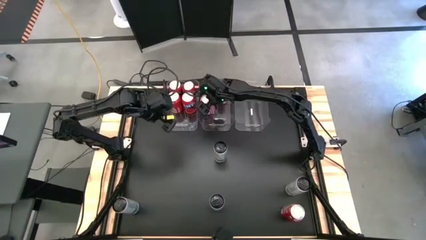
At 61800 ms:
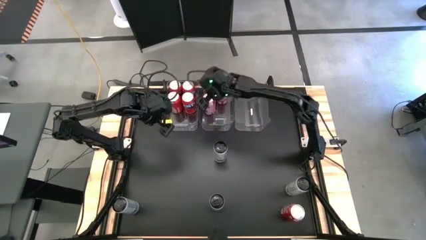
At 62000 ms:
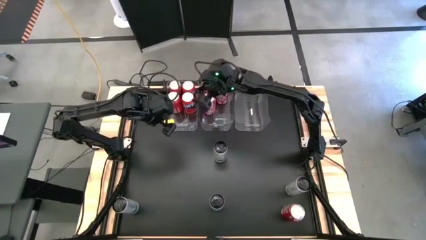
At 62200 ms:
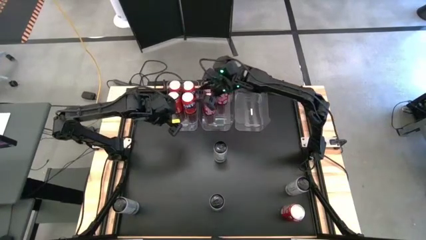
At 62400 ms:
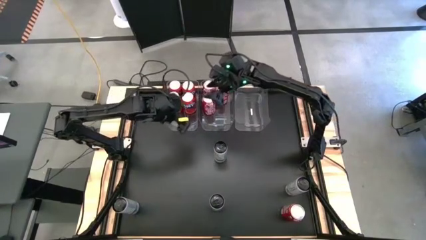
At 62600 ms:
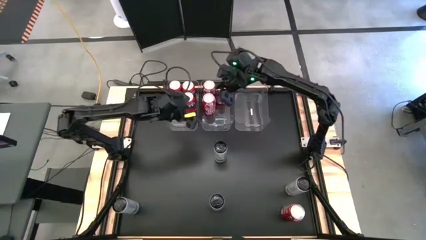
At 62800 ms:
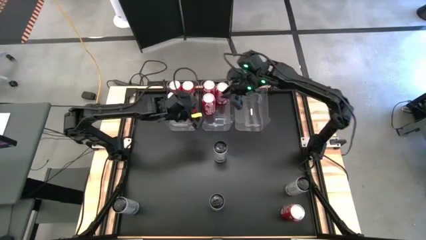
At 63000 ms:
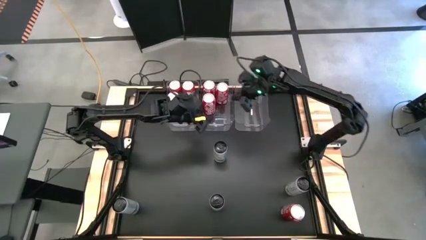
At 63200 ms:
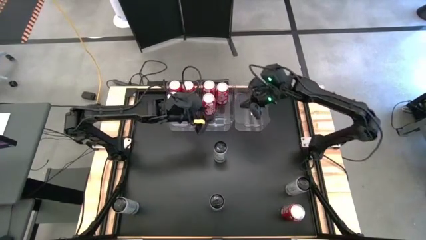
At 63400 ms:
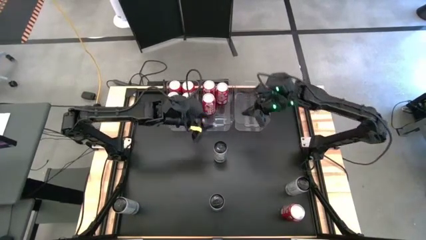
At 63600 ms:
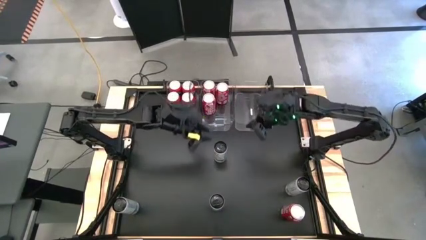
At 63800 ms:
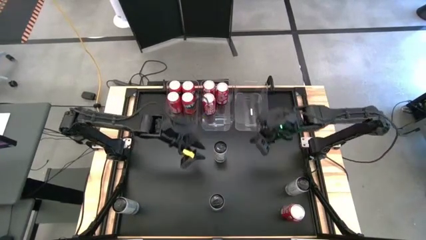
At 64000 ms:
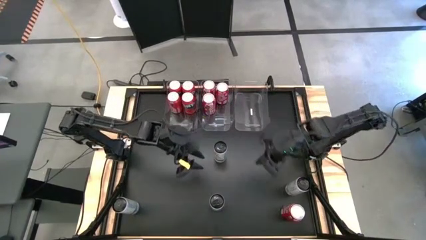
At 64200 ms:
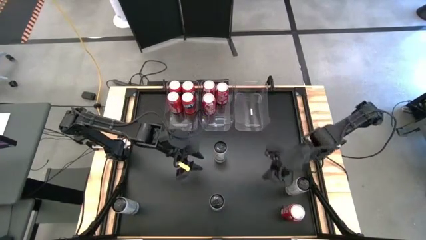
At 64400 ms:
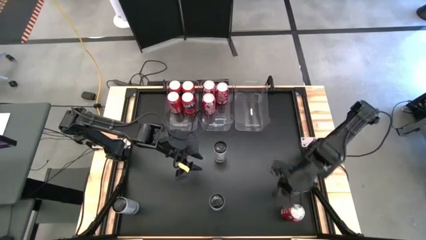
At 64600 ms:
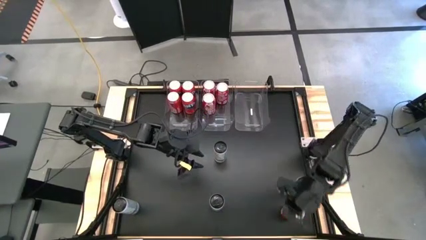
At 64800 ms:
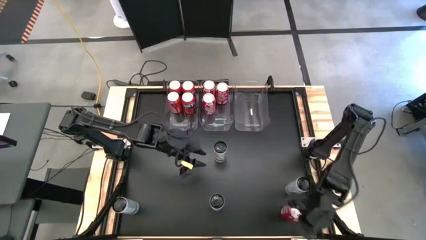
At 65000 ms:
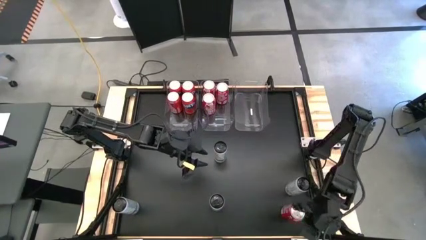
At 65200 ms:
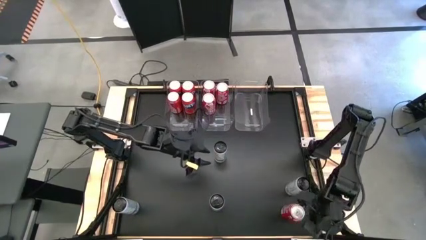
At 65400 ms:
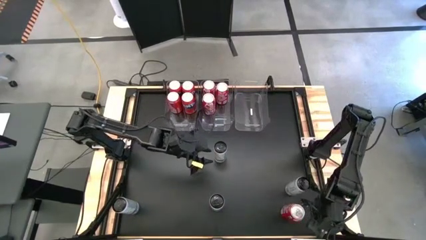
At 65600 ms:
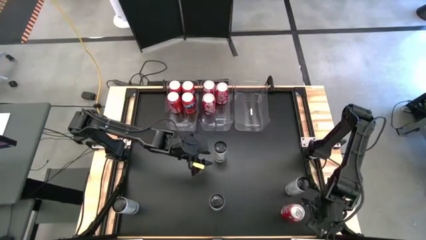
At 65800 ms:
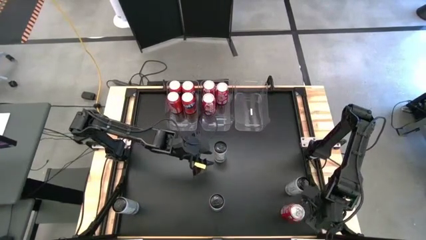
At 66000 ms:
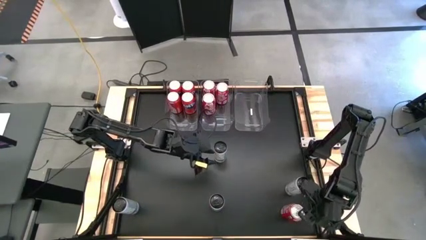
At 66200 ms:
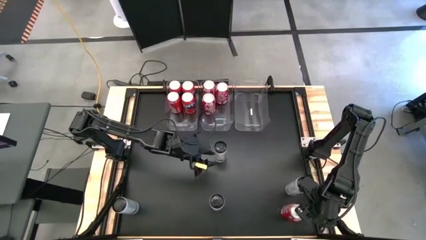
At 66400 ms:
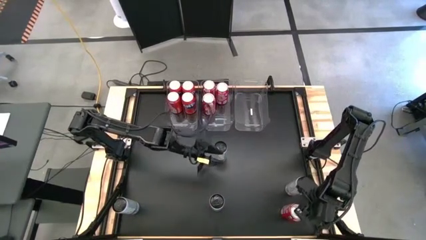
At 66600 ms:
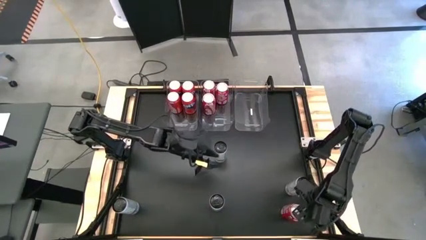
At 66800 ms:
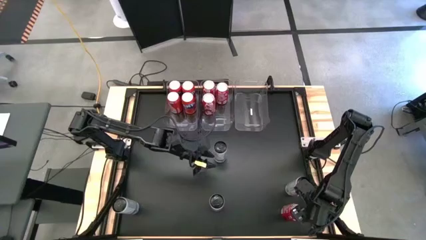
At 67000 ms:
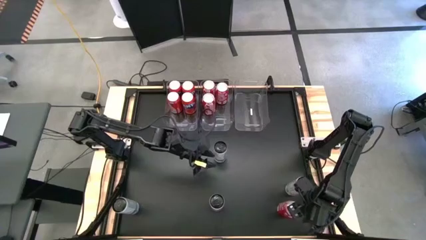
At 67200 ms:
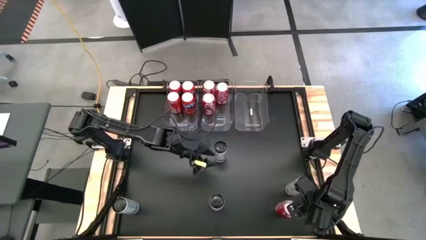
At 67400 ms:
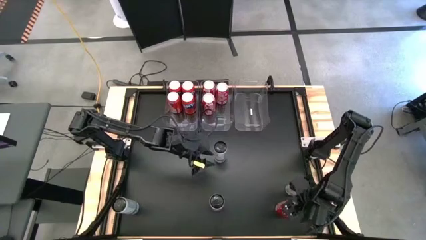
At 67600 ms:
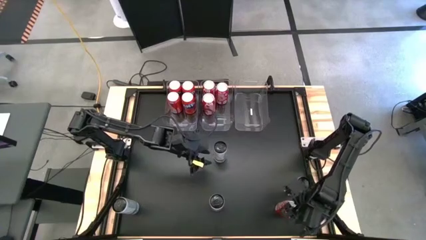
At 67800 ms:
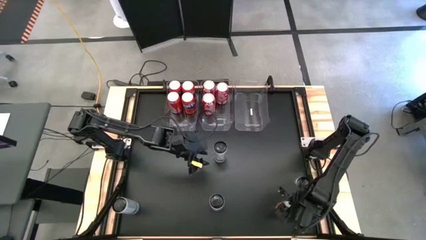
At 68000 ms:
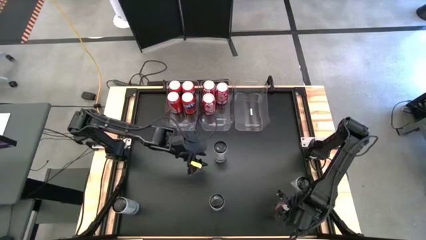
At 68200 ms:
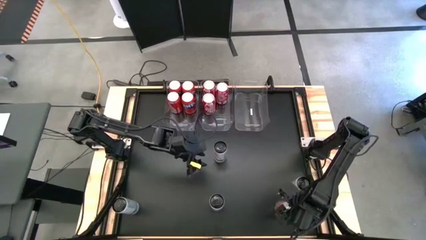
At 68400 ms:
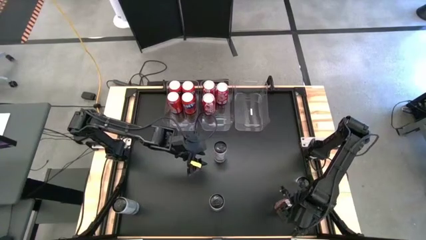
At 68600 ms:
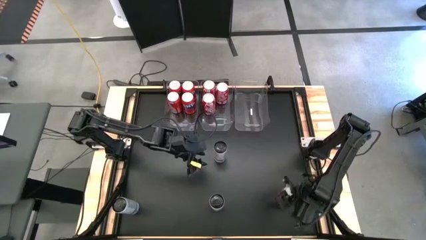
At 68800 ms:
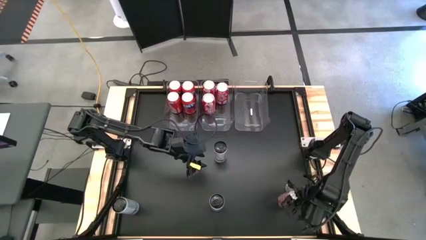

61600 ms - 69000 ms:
Task: Sort soda cans
Put the red and white soda can into the middle transparent bin

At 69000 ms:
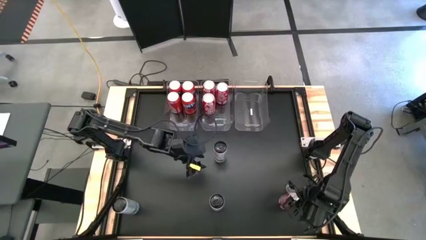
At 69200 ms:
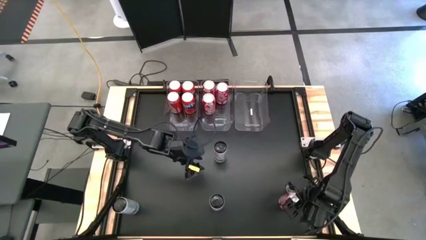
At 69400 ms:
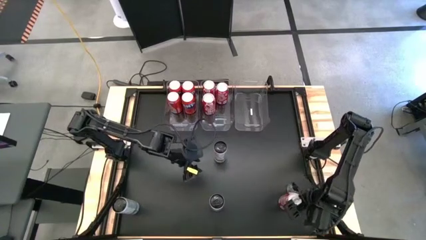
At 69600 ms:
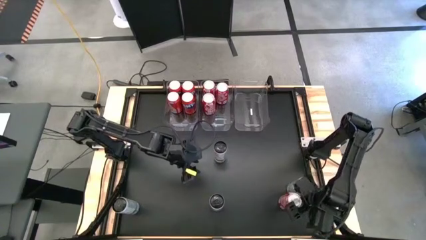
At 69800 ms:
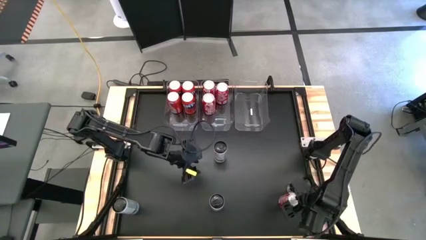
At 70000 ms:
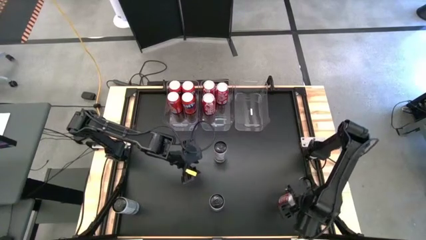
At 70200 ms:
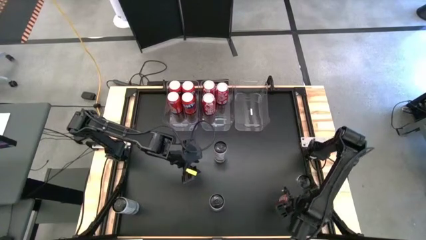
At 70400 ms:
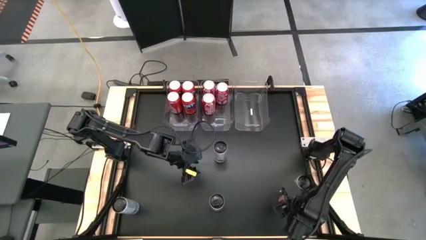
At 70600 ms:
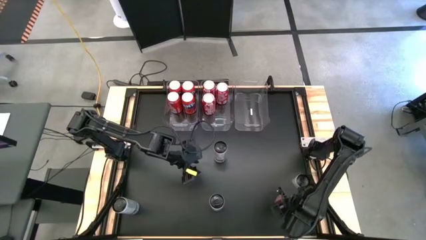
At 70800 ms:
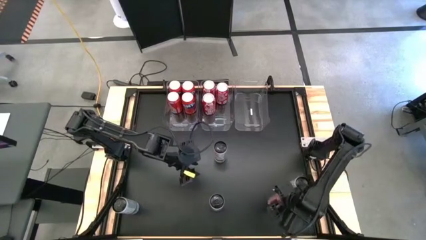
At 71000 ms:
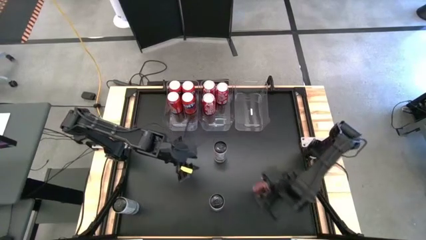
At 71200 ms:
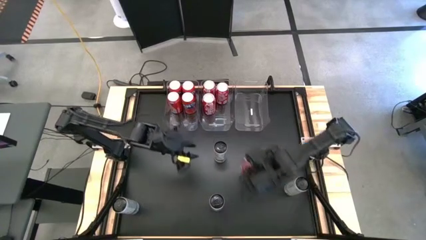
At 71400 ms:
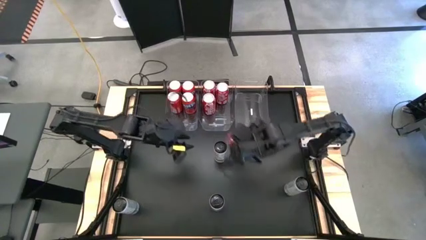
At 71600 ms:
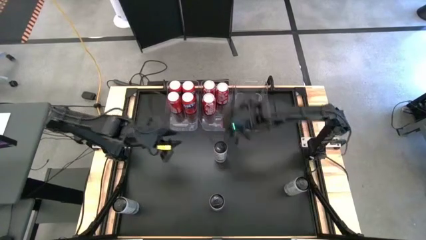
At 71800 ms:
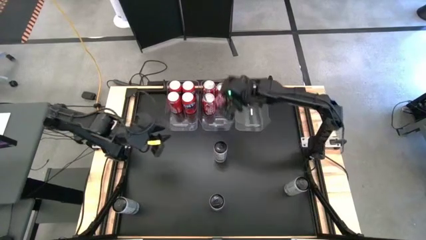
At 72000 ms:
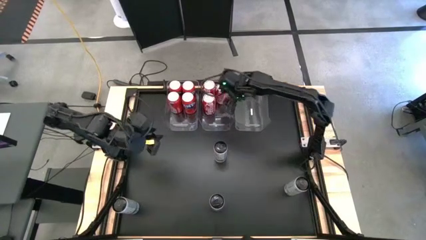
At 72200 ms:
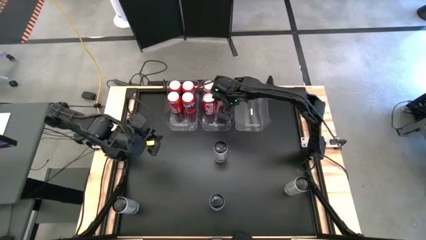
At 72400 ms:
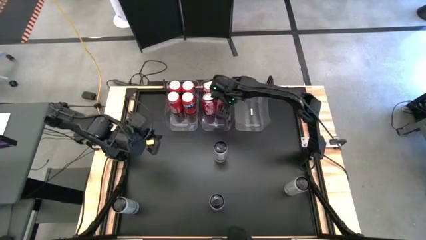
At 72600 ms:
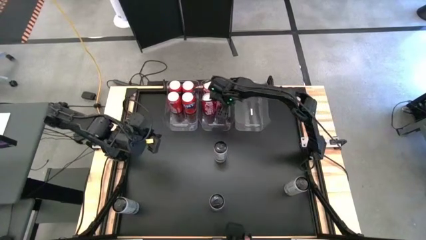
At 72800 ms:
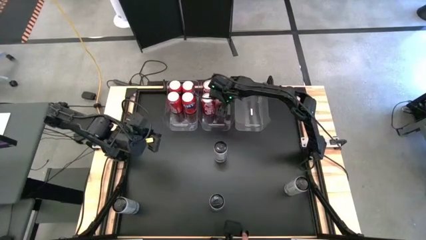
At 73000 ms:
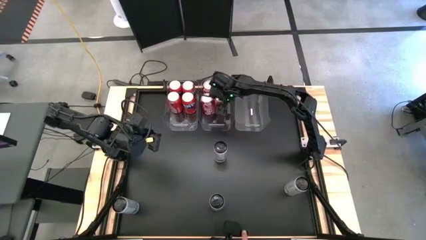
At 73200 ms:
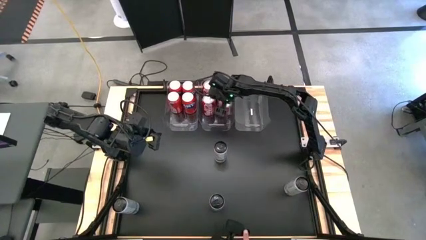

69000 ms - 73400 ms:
Put the red and white soda can into the middle transparent bin

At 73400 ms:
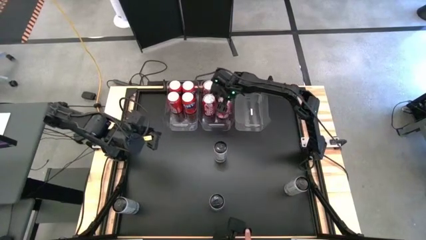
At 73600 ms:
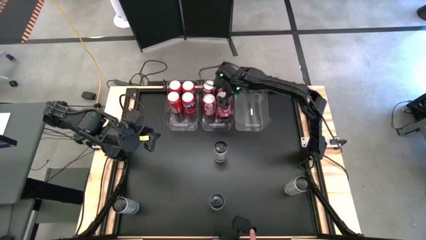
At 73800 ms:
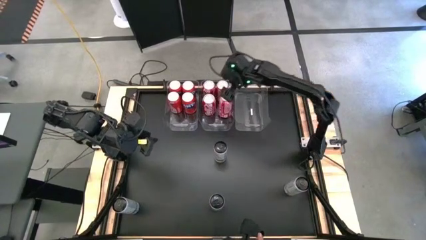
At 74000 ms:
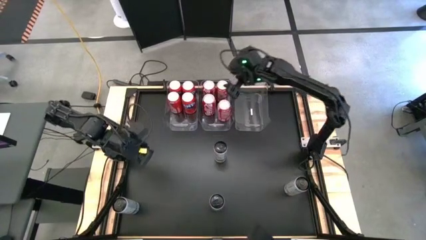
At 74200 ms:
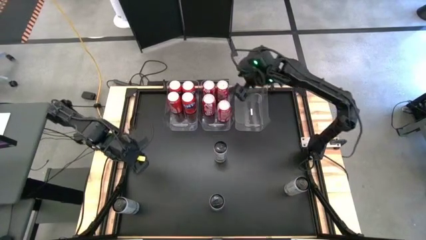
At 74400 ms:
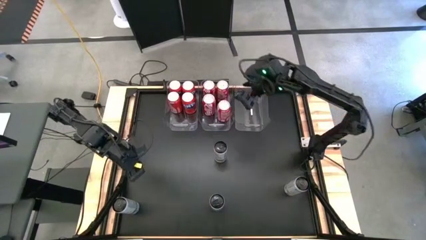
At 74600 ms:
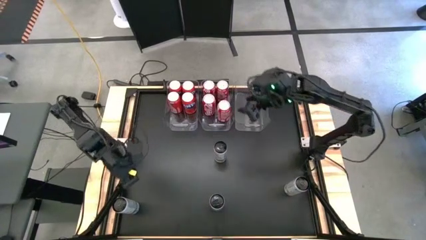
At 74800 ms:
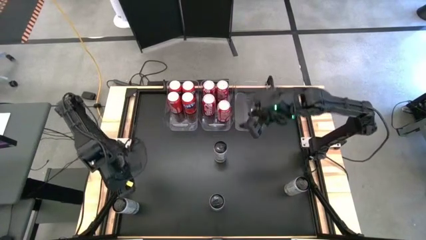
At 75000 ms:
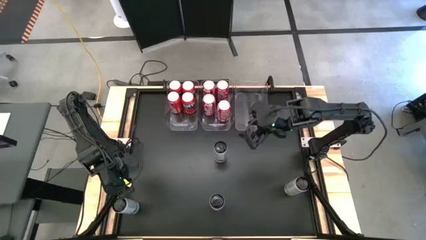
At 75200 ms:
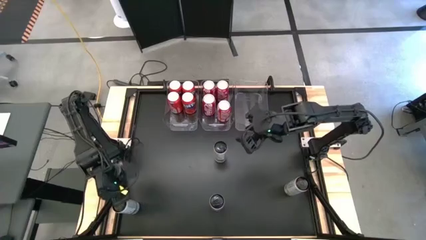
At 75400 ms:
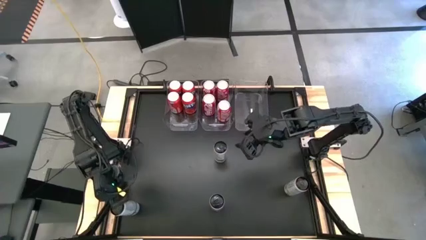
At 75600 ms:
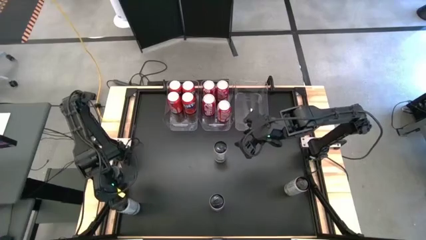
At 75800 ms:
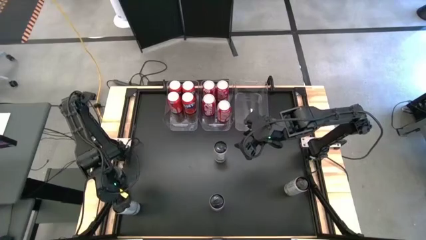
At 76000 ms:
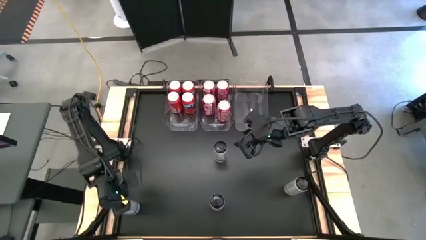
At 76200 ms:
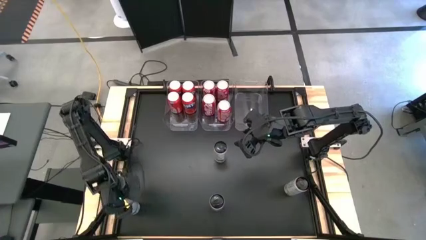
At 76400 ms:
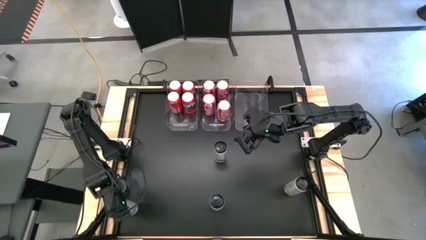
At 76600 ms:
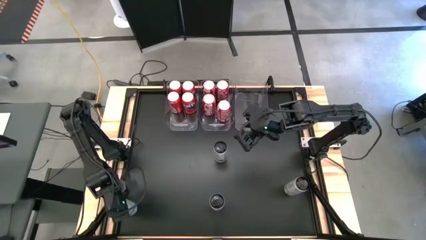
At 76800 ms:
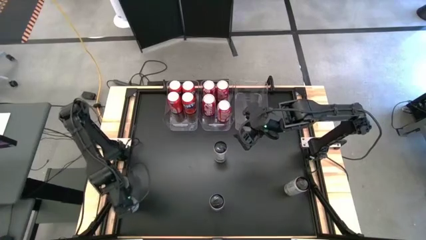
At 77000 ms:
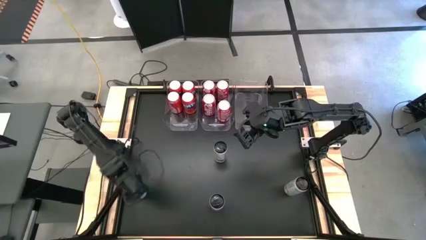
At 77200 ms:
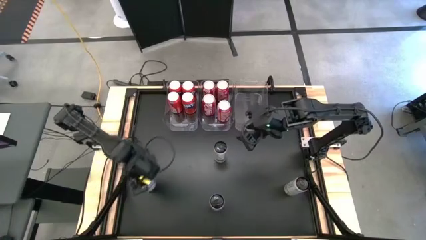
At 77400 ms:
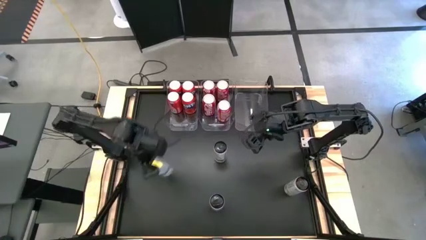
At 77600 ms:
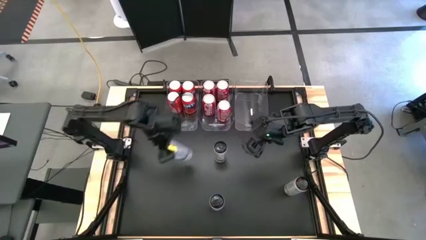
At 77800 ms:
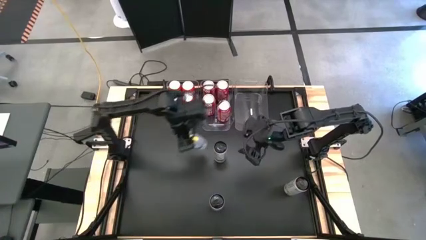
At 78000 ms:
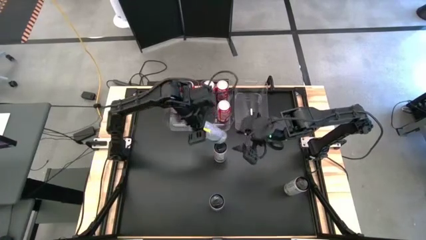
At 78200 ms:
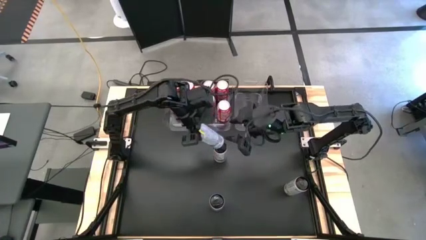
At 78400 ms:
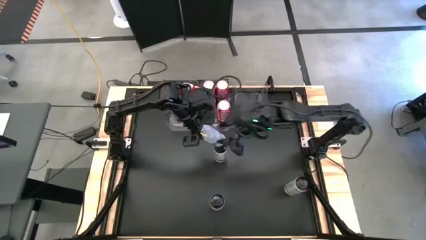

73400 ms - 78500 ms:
Put the bottom left white yellow soda can into the right transparent bin

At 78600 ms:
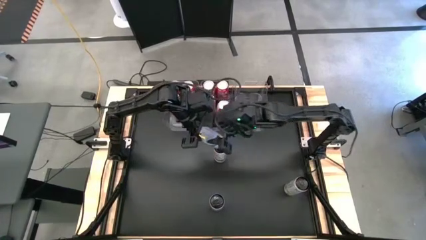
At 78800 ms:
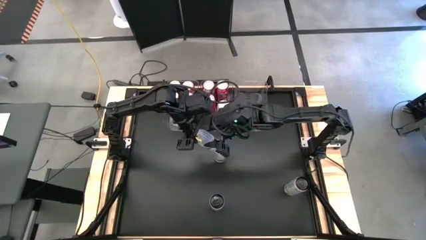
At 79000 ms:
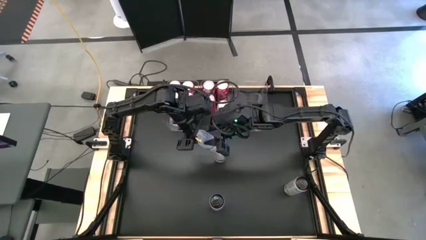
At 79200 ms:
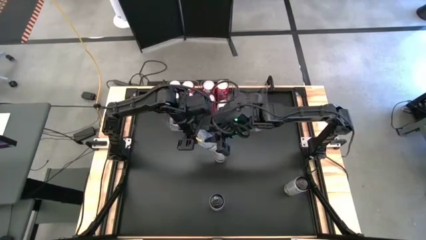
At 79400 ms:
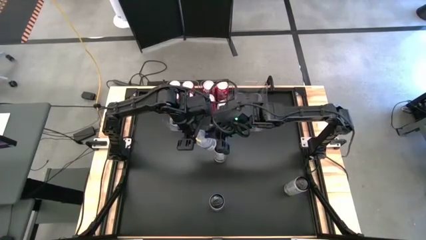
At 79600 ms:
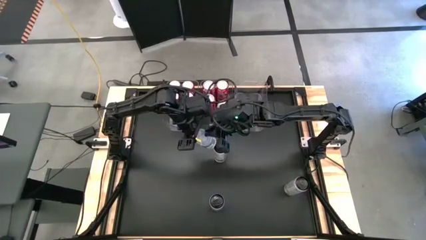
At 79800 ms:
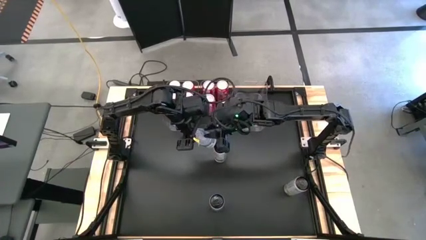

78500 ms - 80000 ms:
Put the bottom left white yellow soda can into the right transparent bin
